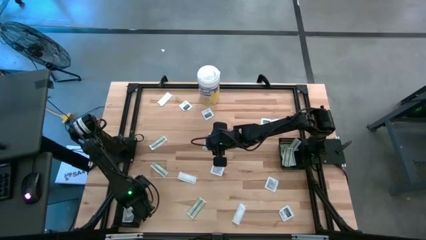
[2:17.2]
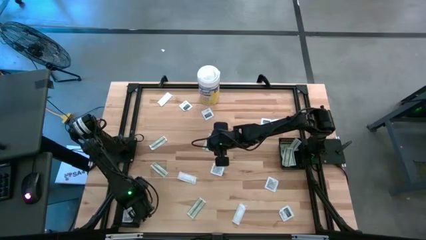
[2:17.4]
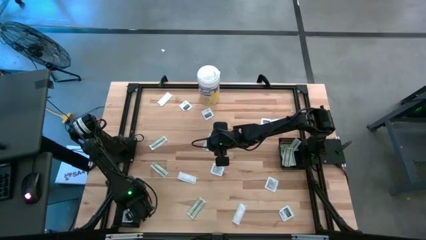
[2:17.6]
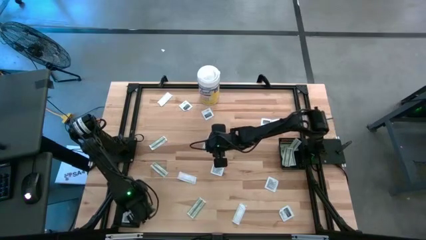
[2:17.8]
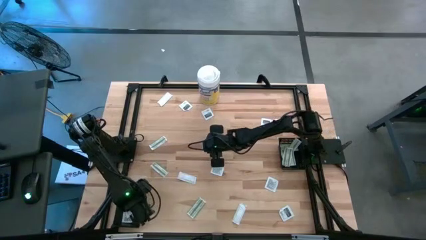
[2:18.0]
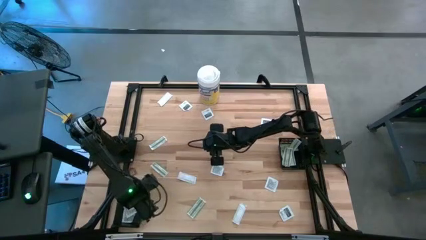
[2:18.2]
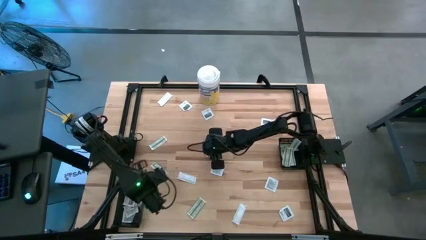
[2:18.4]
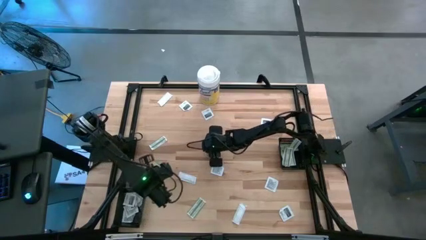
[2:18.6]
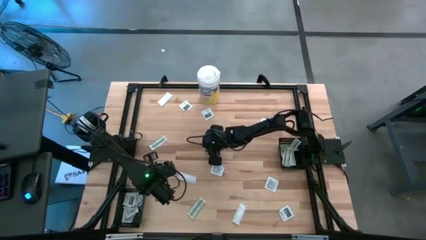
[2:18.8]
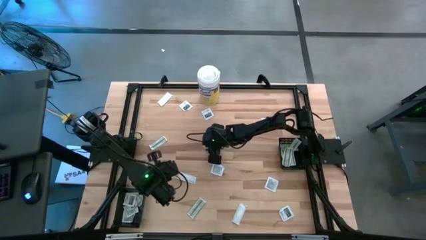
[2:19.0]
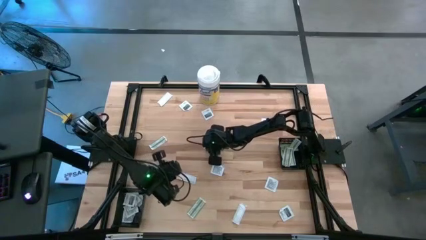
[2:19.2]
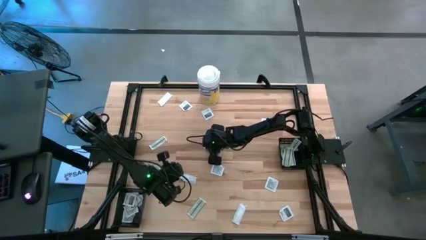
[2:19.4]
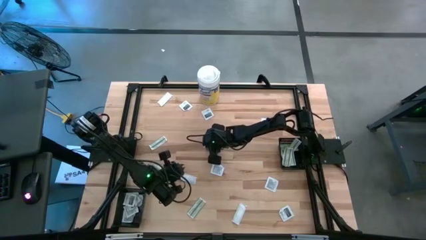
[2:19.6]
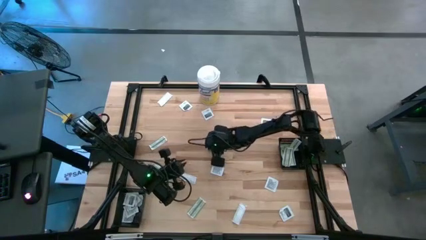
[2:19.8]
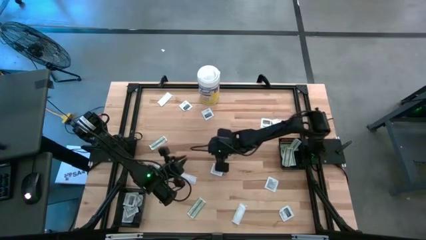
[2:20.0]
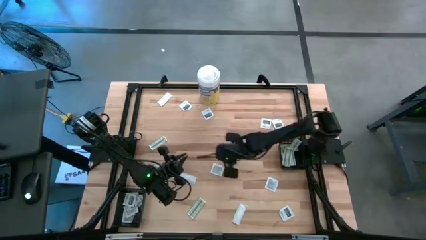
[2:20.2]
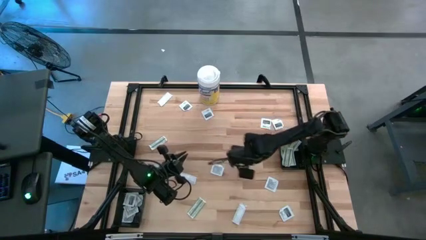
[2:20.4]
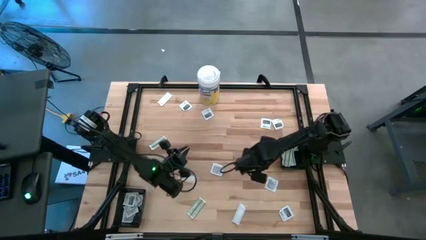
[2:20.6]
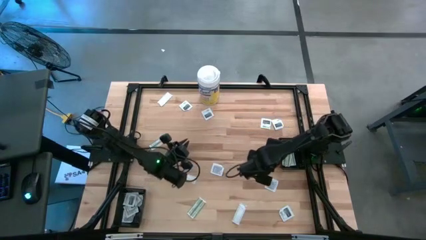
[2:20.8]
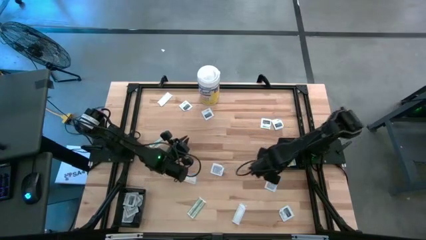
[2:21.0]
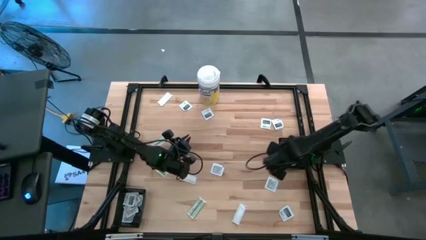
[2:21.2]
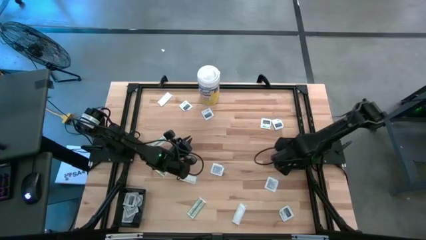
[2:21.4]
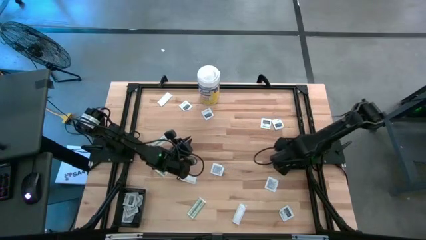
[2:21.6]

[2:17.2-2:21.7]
Task: Pick & Place First Aid Supplies
Put the white towelette sachet into the left black bin

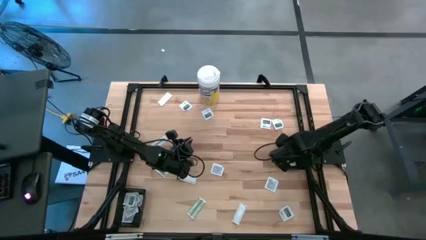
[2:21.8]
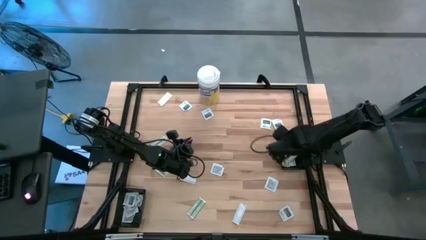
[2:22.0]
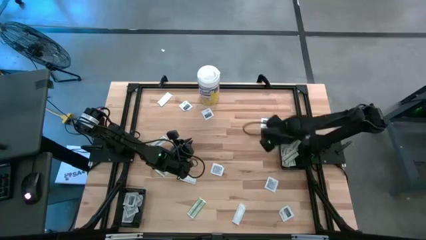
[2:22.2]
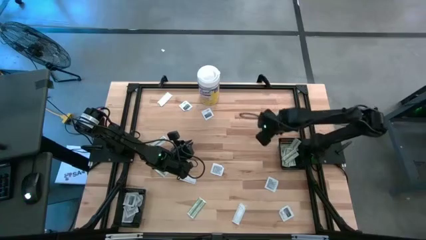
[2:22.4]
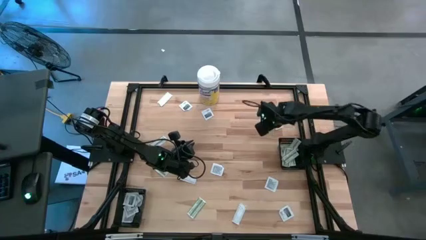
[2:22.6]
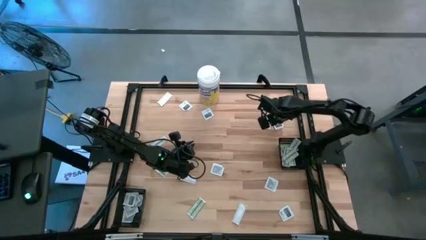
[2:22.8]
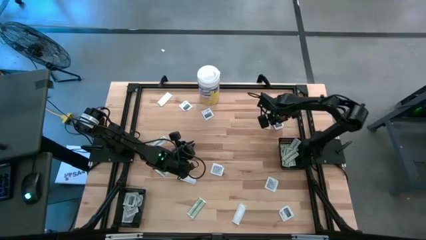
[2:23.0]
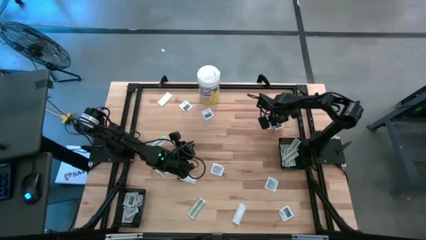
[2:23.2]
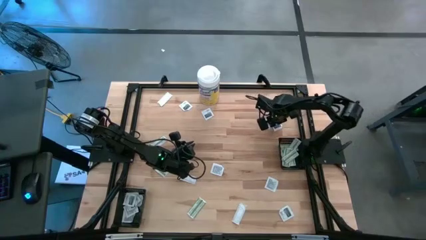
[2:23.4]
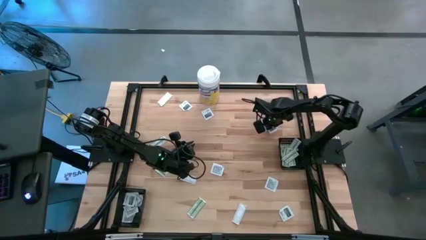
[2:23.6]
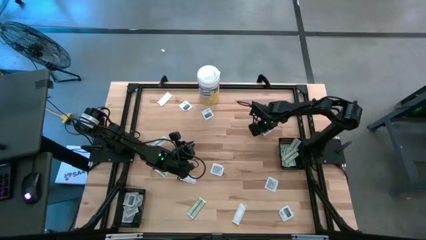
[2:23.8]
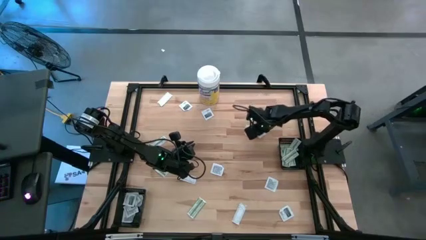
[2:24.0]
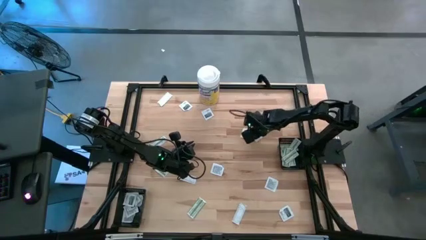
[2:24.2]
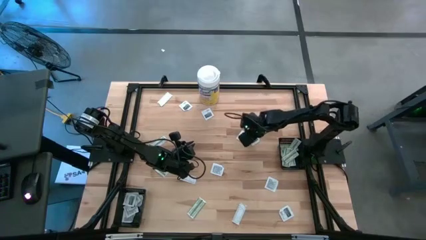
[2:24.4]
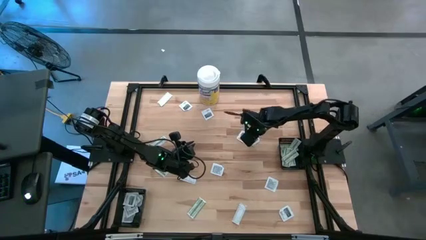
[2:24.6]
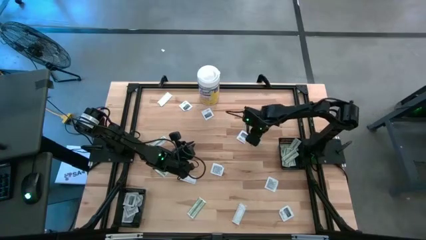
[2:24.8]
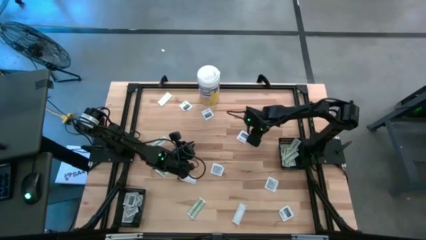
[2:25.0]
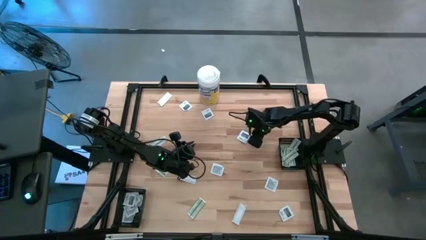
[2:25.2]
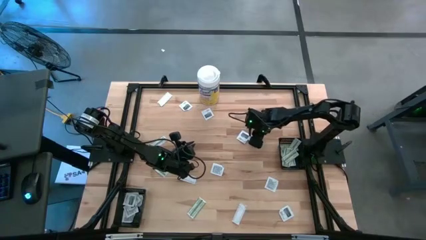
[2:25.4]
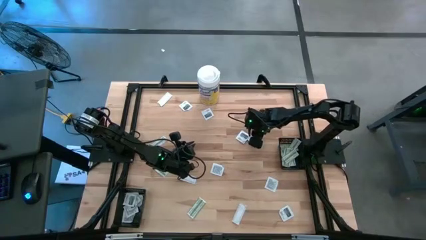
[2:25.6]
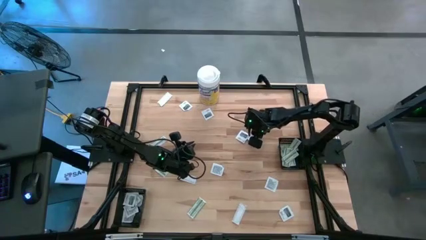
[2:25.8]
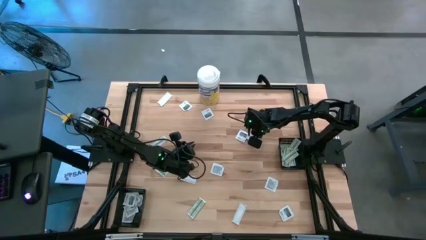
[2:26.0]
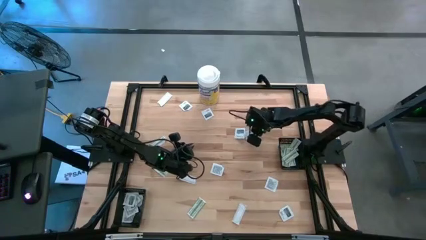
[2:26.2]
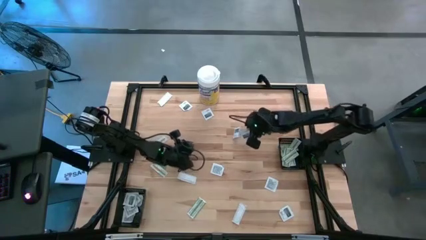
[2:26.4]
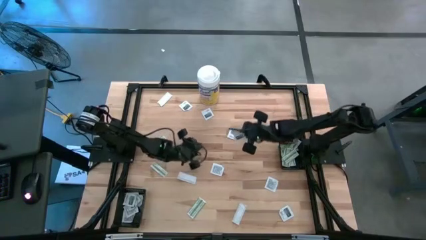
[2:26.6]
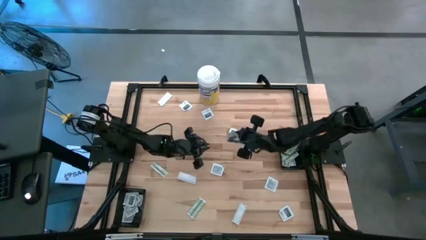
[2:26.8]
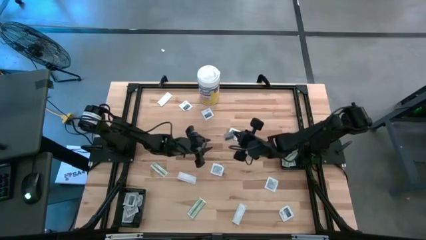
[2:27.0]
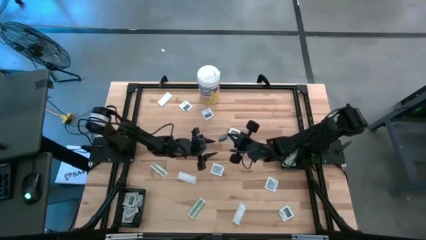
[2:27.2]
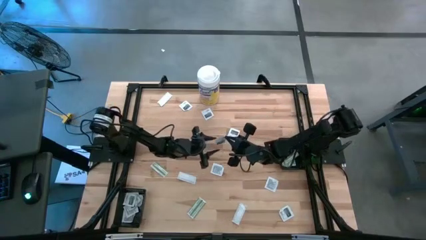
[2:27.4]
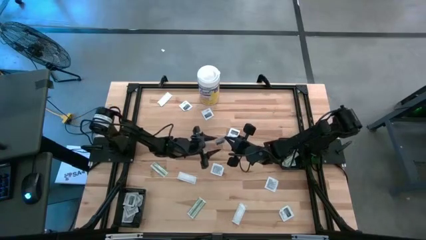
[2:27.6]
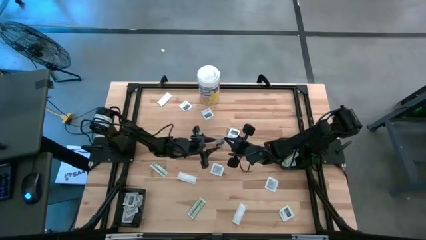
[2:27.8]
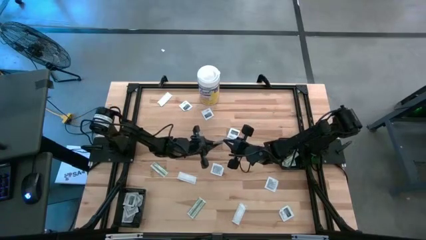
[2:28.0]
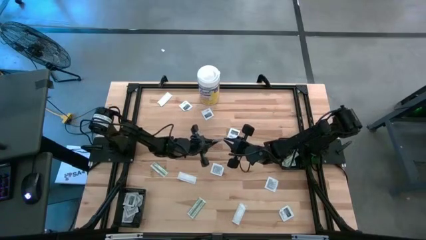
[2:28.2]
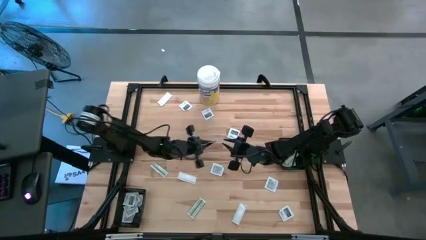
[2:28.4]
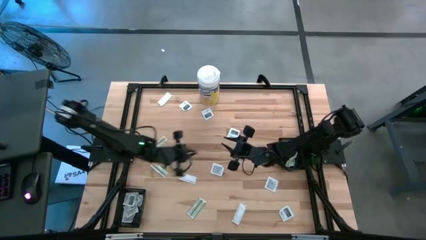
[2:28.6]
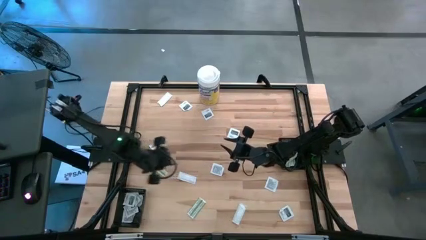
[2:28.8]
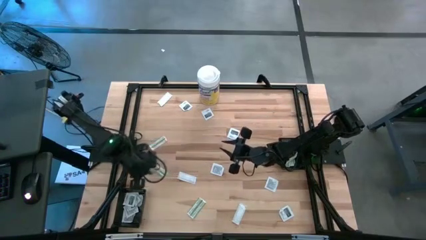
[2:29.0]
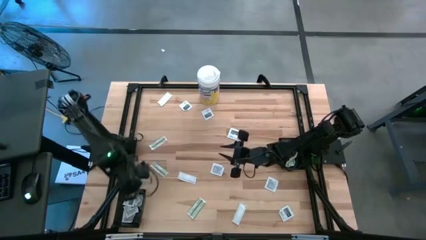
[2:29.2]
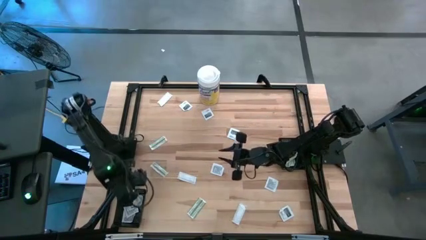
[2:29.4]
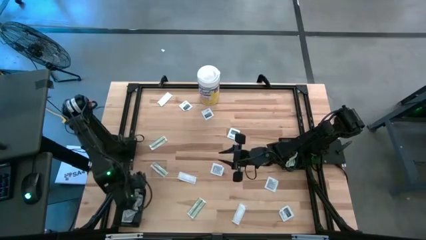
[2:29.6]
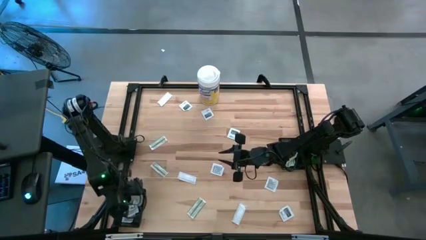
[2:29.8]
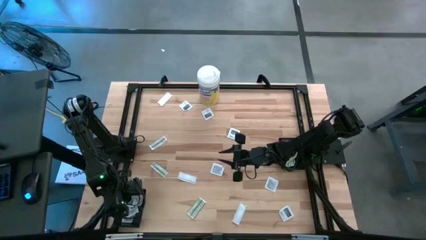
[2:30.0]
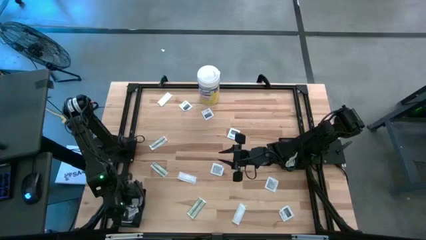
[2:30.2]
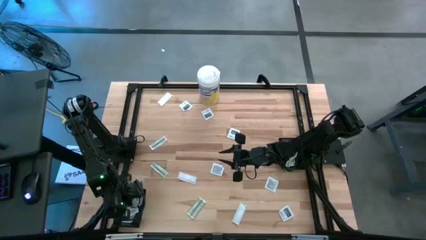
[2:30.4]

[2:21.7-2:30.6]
Put the white towelette sachet into the left black bin
